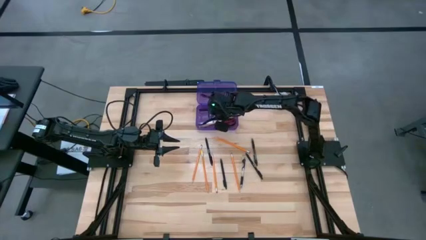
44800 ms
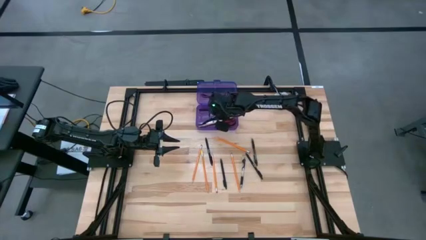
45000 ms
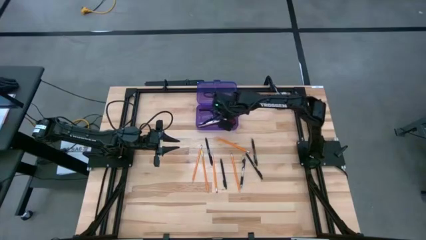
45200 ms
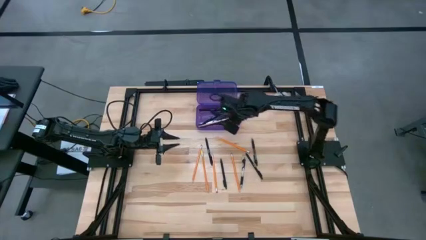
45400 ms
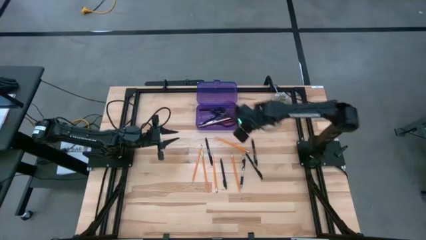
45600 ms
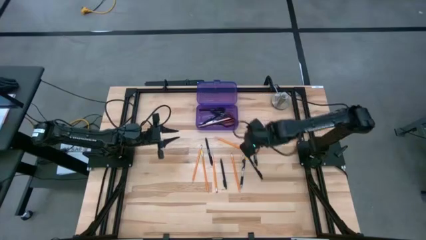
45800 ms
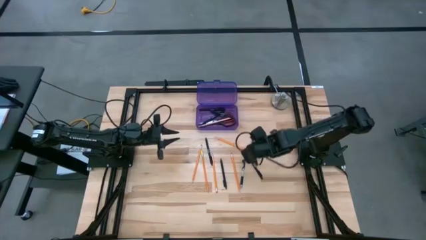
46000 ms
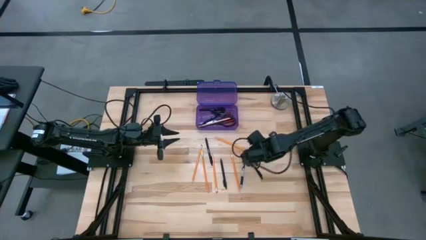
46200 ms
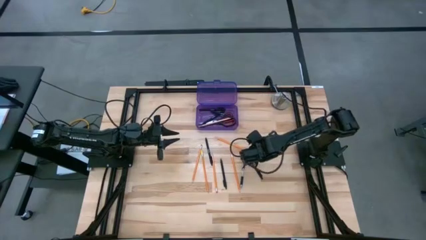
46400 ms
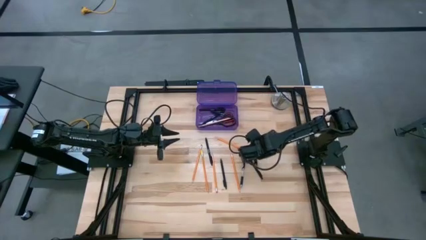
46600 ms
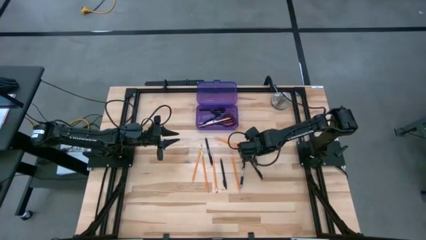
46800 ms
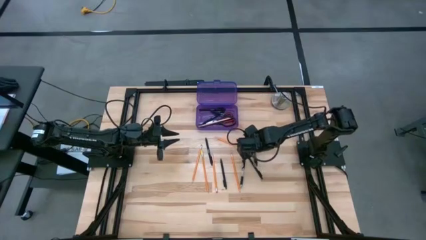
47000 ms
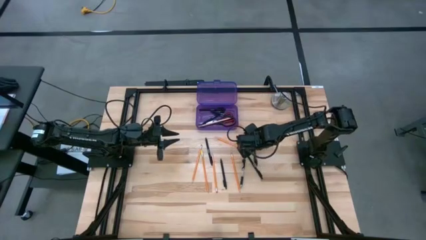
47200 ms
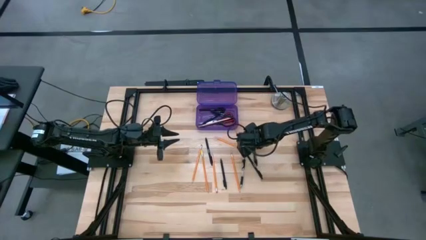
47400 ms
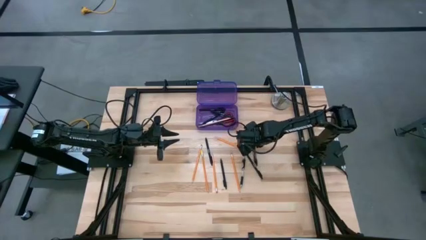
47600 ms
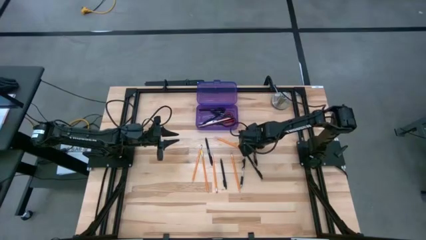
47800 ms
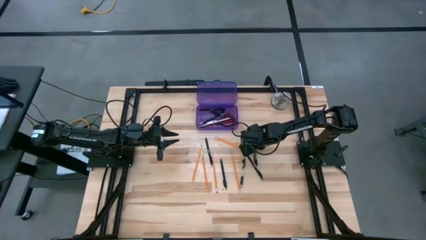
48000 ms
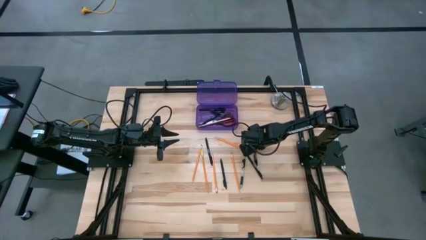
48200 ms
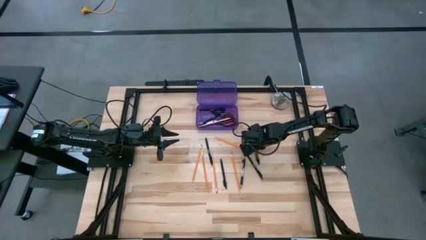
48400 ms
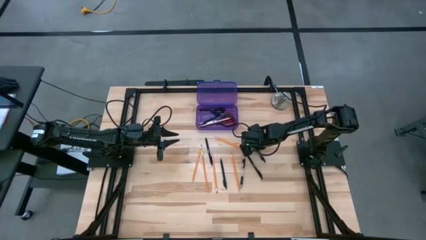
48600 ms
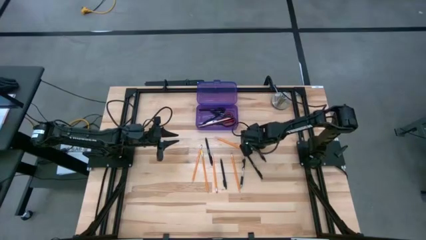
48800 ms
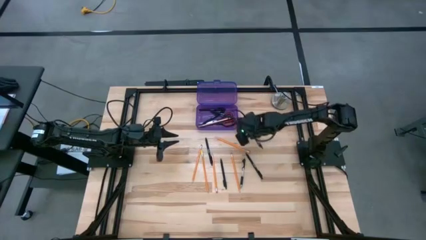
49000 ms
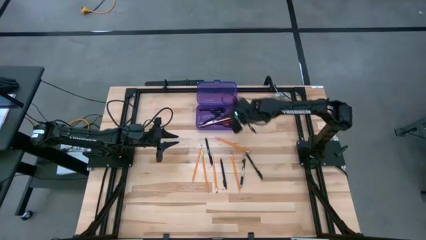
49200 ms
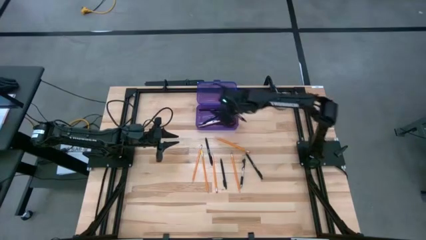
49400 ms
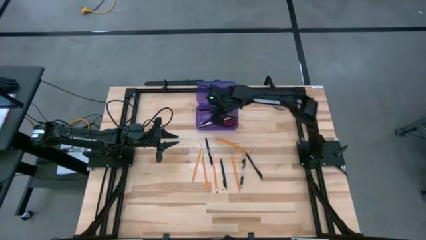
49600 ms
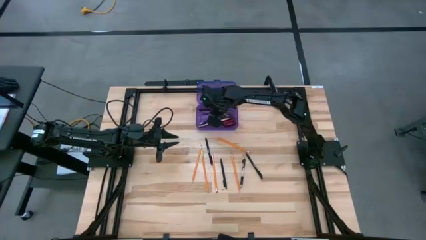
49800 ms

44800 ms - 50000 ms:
Task: Pick & place school supplies into a supply box
Put the transparent pen into the violet supply box

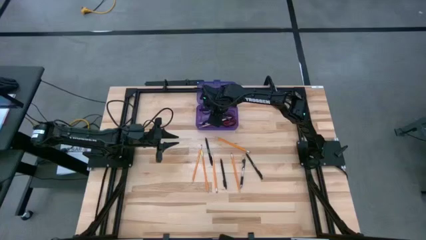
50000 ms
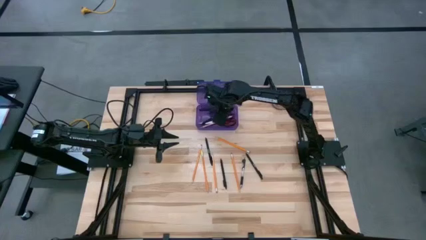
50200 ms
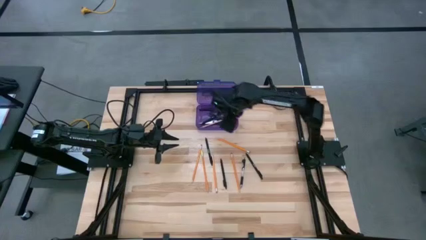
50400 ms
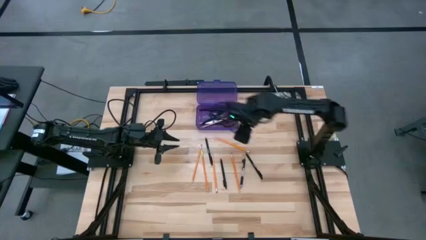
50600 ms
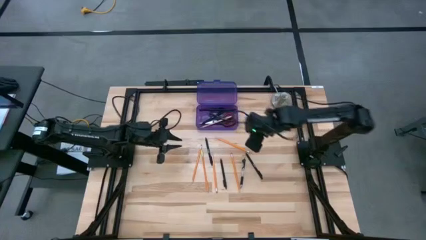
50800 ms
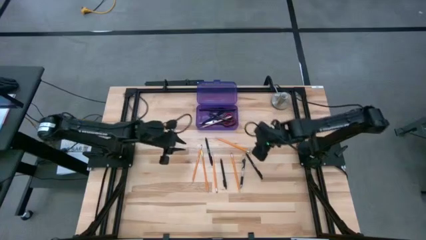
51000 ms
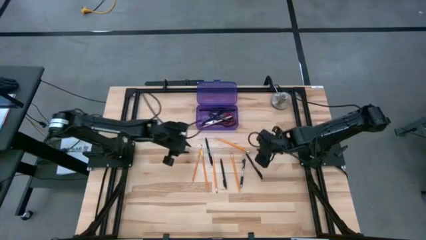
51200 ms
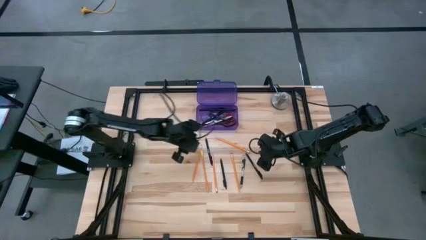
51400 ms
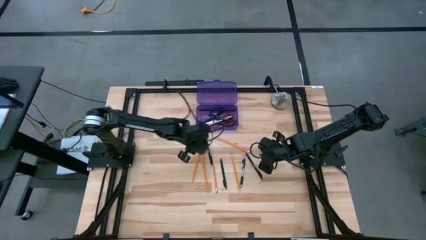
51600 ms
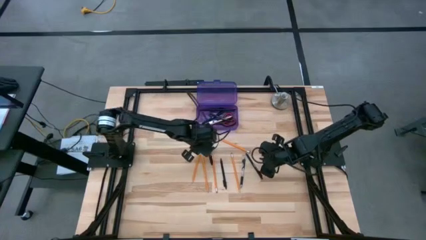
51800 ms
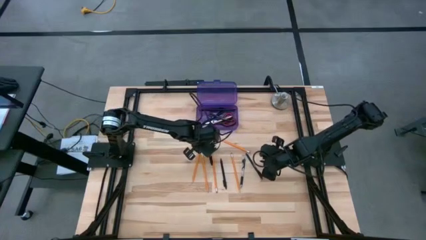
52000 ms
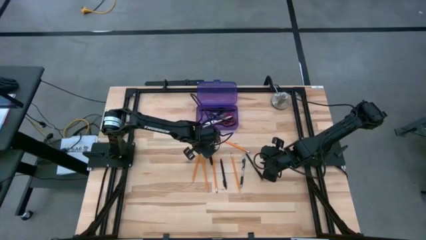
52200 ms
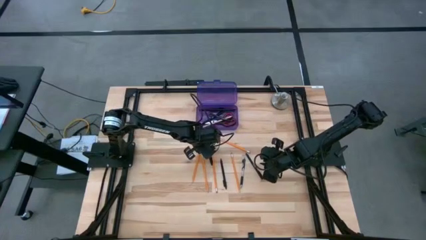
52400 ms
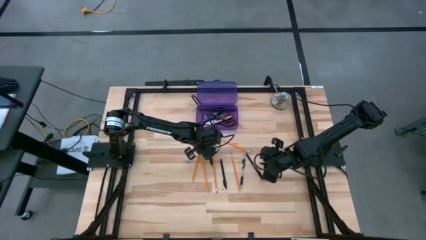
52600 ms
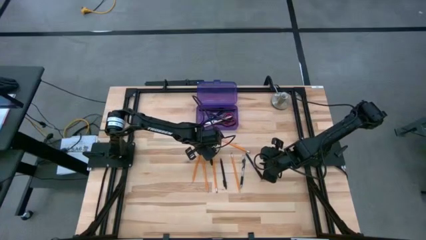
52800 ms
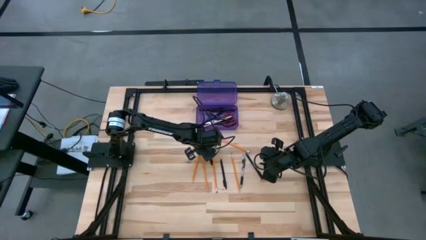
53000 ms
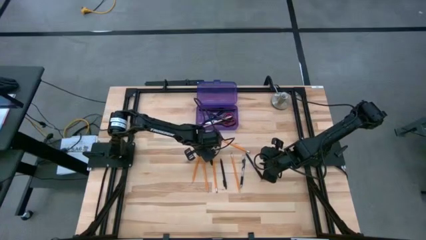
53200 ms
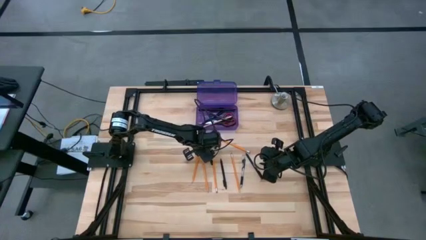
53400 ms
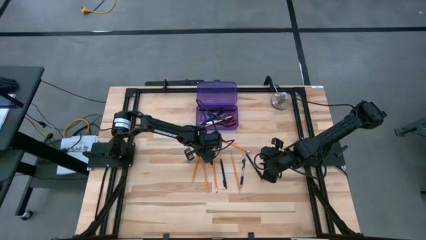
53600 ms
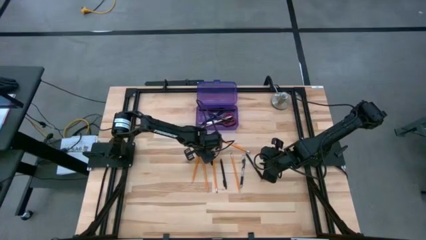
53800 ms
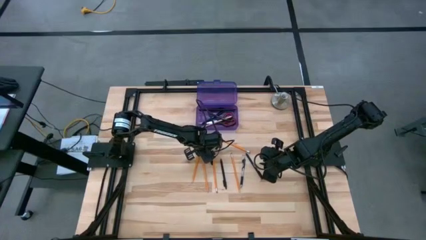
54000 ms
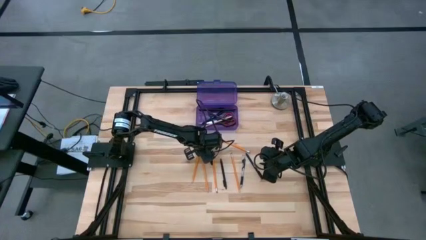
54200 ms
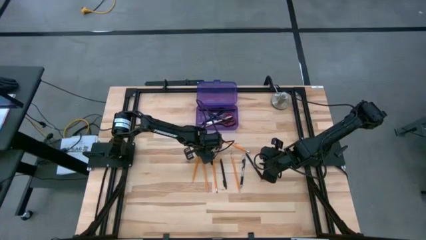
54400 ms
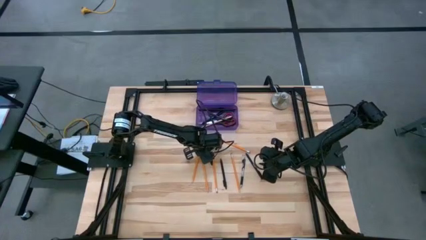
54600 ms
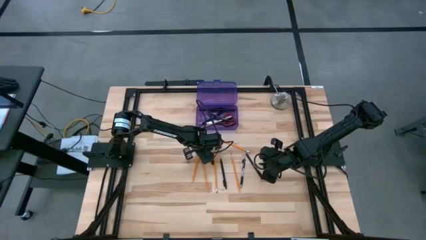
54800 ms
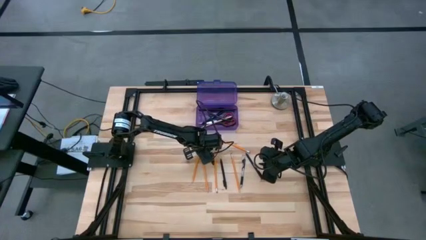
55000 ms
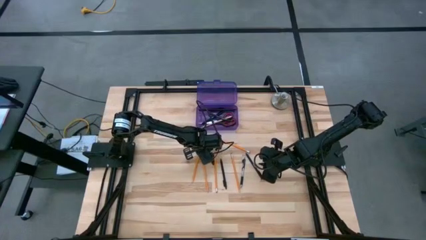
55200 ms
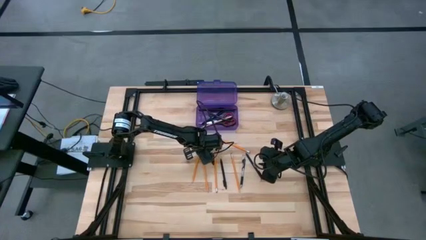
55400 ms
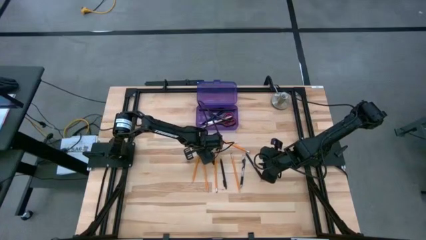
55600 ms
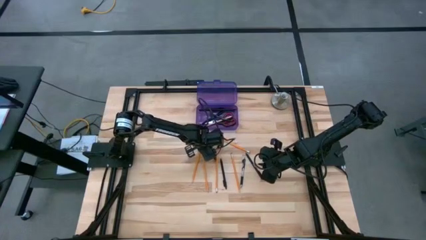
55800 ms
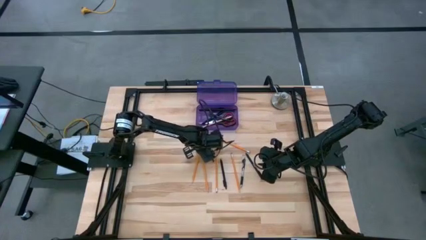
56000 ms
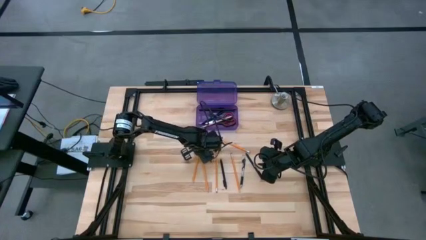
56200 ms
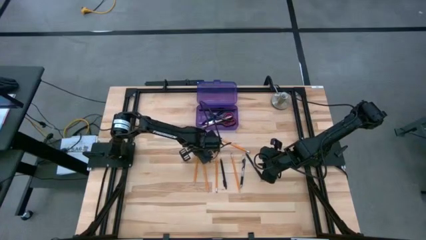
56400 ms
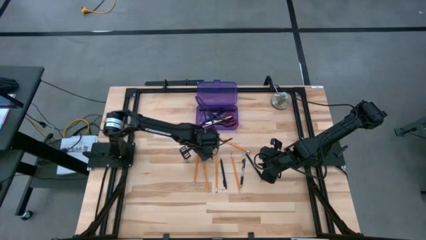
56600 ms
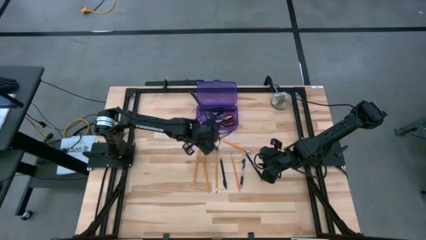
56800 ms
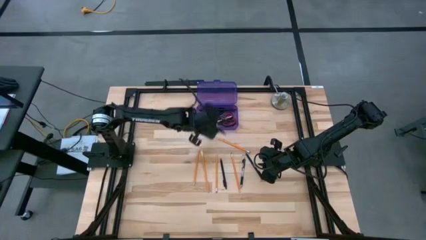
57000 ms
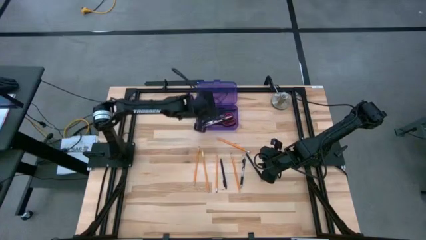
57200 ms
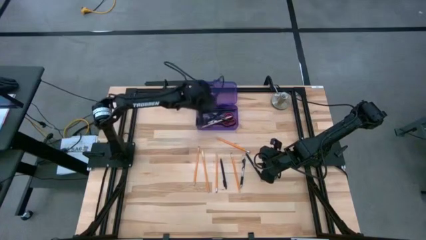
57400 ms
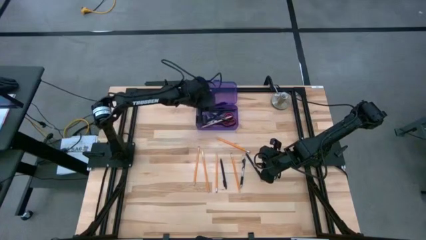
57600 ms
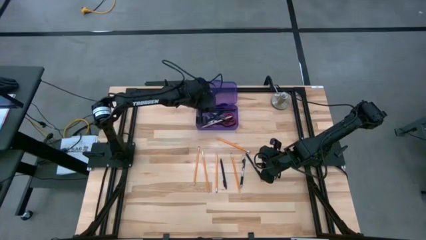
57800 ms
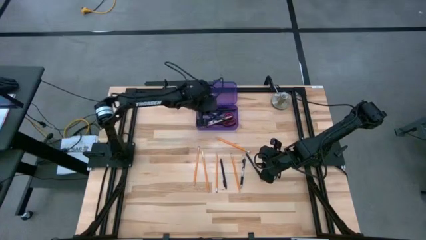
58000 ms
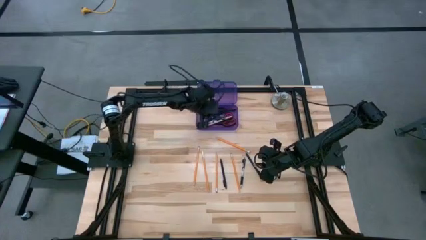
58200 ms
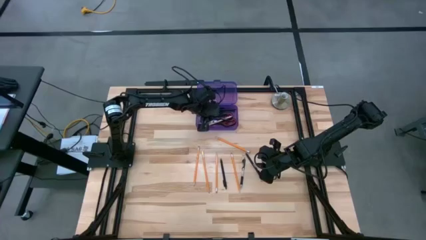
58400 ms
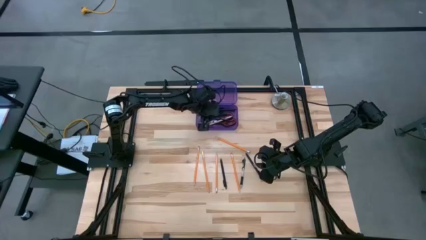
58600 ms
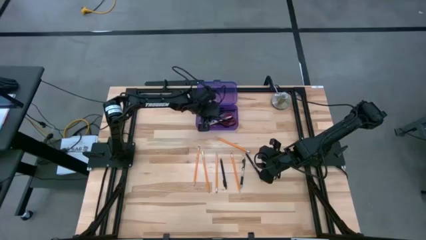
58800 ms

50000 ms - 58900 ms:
Put the black pen into the violet supply box

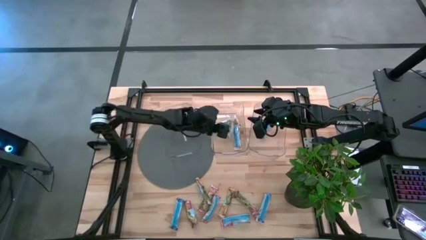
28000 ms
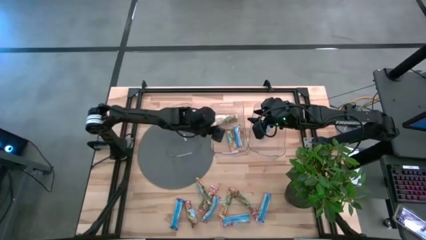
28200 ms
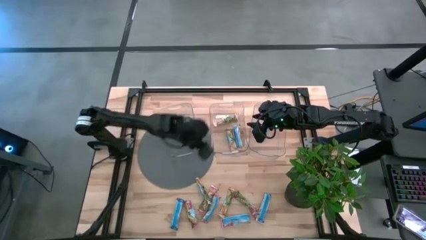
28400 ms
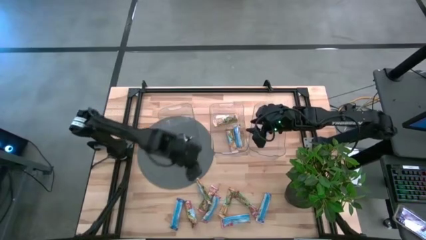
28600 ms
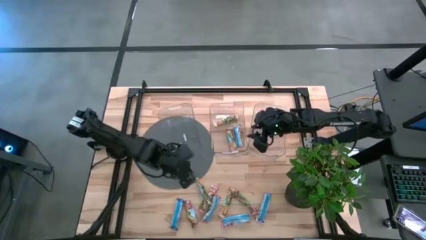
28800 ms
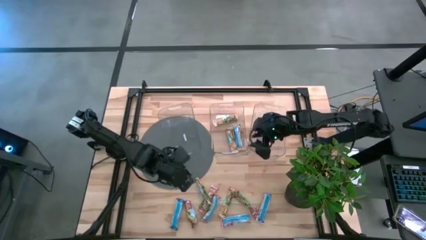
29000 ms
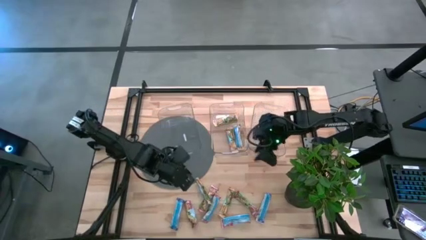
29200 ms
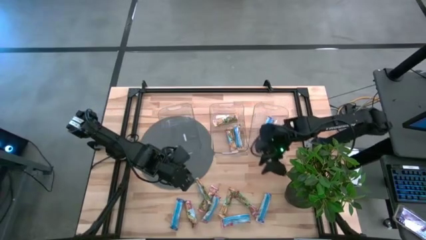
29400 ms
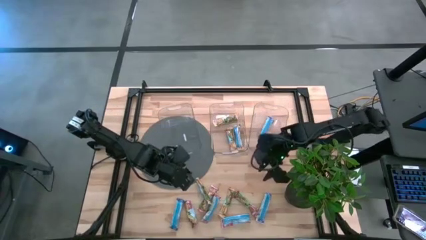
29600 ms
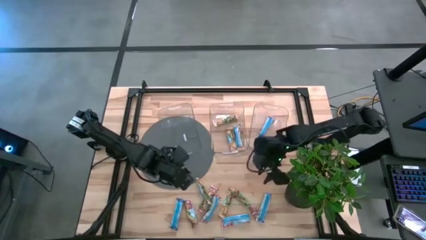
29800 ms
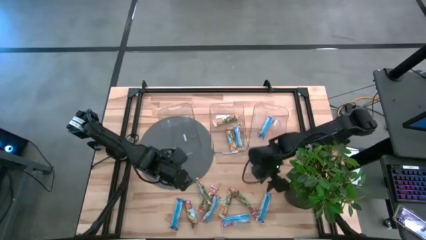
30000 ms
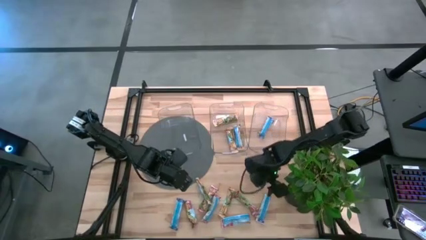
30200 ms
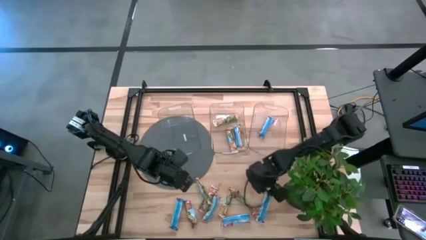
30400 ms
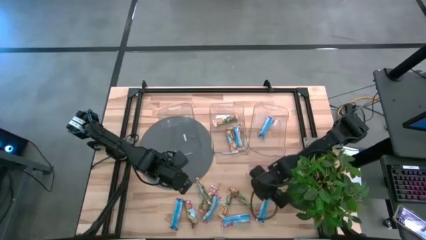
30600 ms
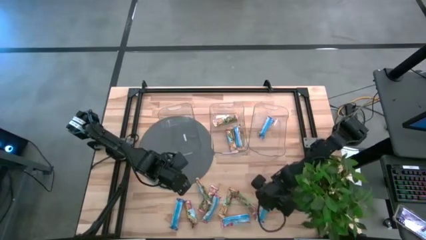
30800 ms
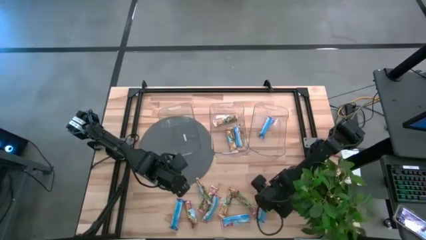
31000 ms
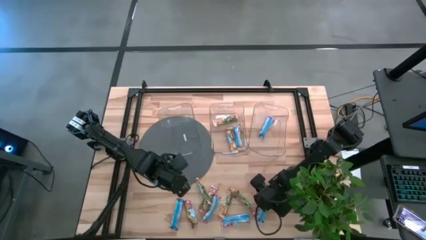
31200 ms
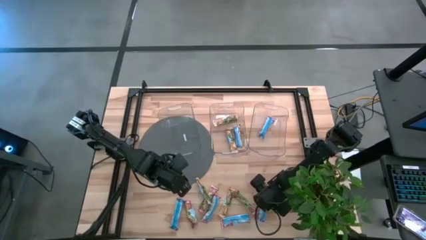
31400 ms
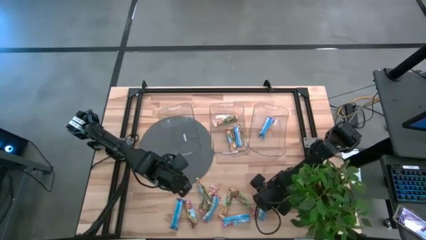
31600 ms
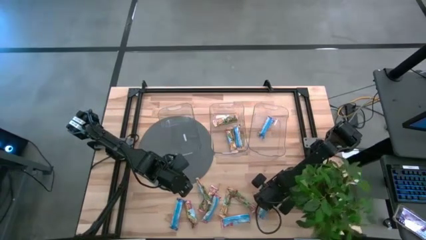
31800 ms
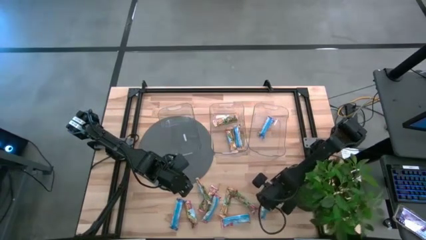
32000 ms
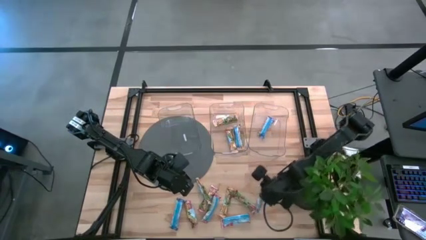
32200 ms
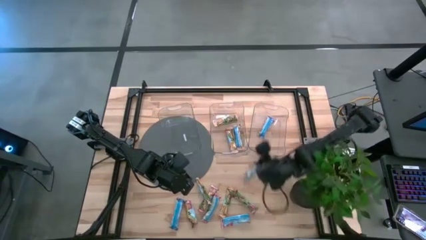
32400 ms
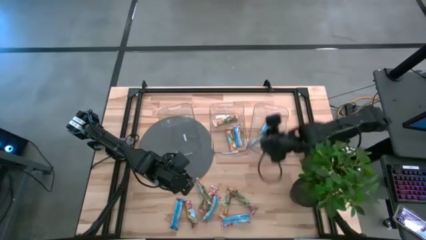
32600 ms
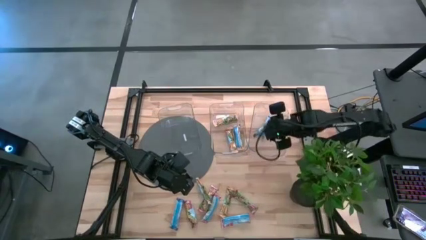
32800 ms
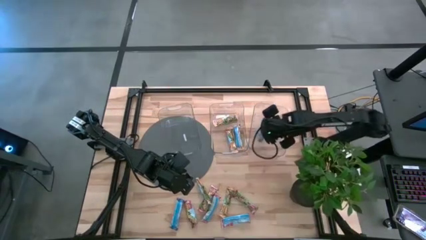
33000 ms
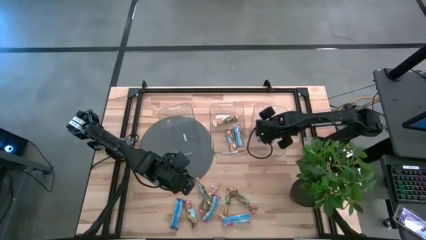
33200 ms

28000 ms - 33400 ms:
Task: Pick and place Granola Bars by type
Put the blue granola bar into the right transparent bin
